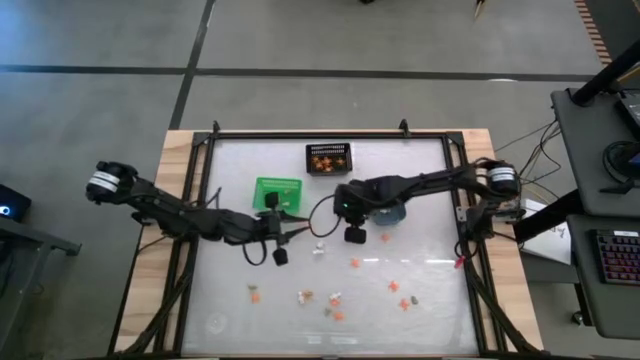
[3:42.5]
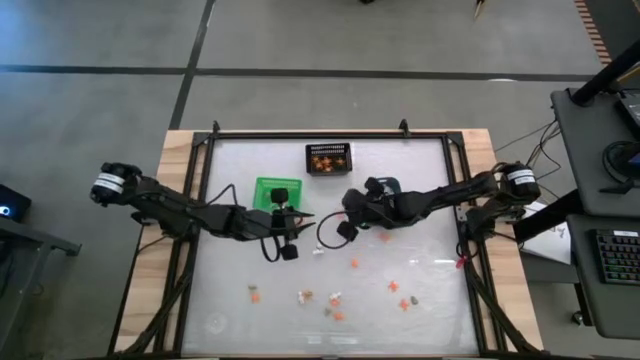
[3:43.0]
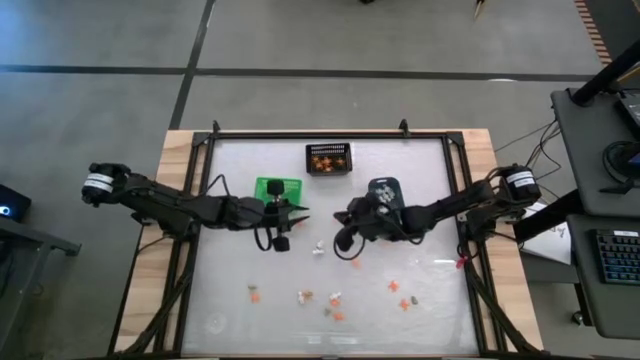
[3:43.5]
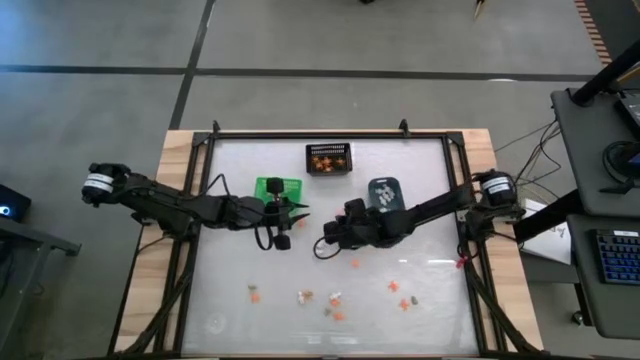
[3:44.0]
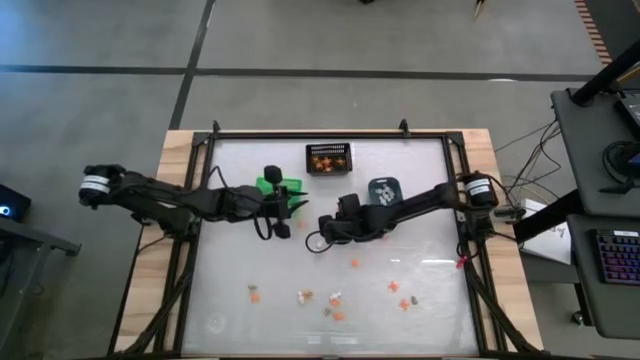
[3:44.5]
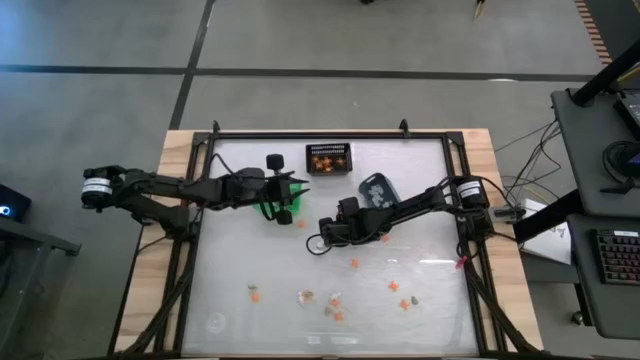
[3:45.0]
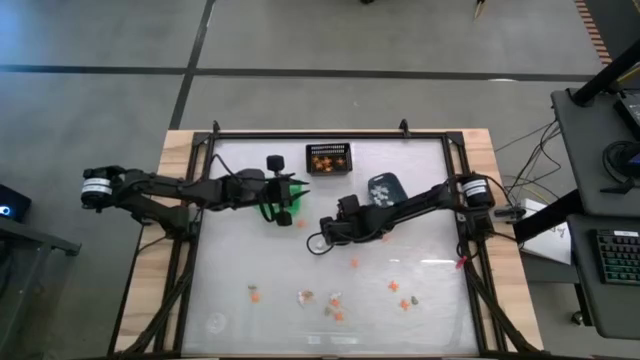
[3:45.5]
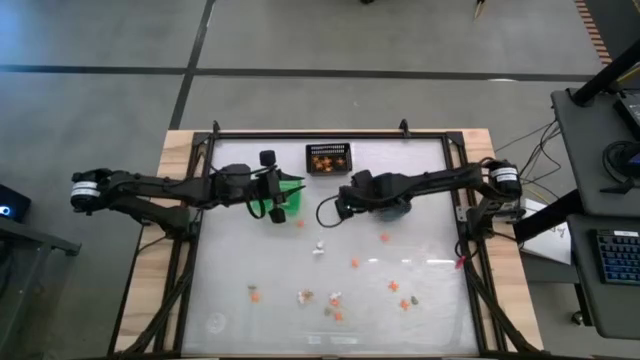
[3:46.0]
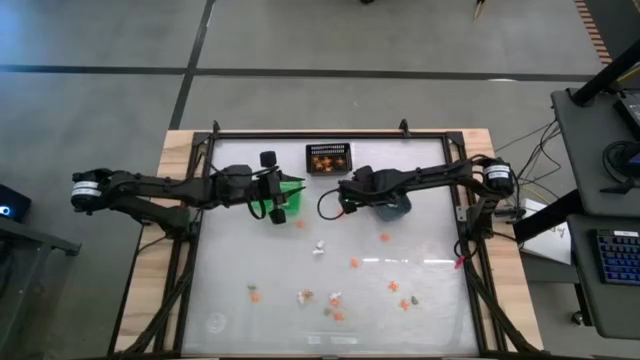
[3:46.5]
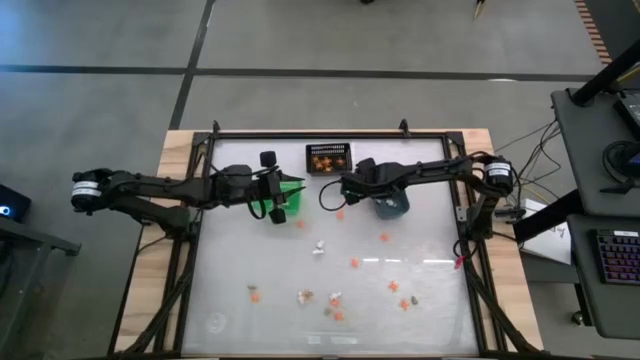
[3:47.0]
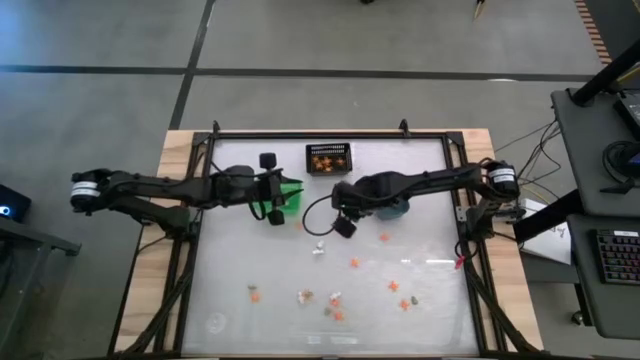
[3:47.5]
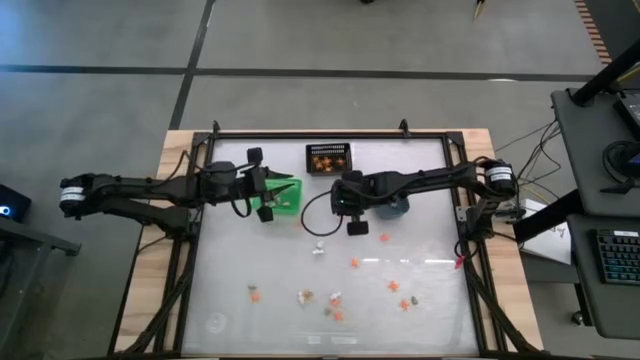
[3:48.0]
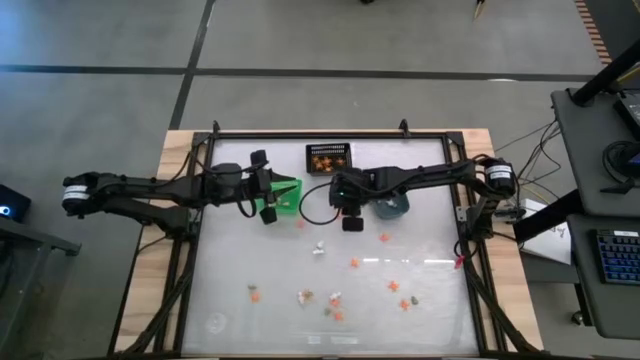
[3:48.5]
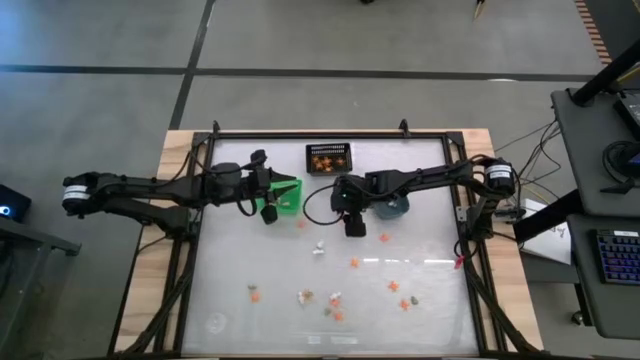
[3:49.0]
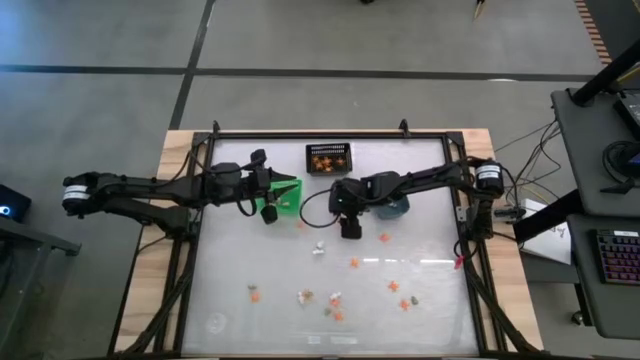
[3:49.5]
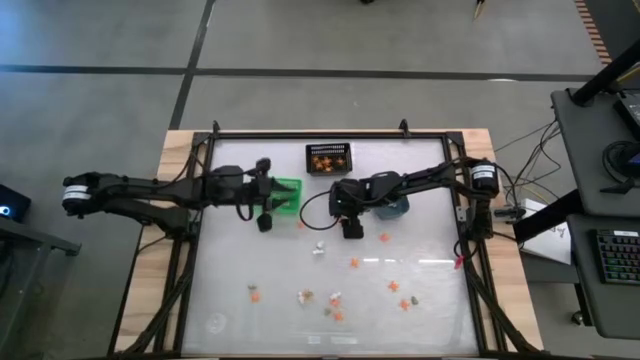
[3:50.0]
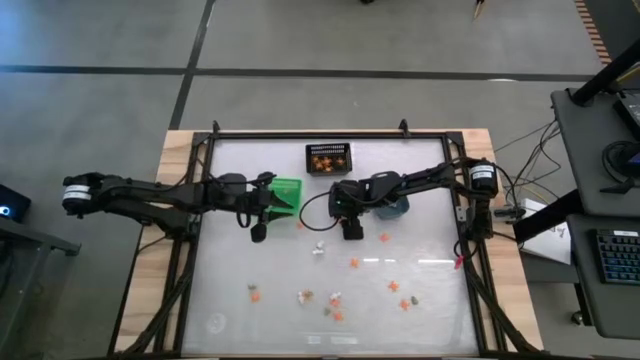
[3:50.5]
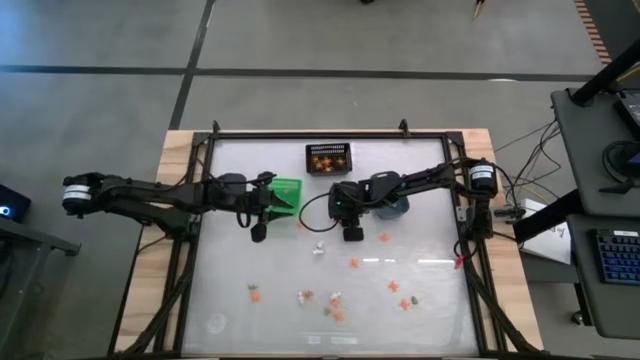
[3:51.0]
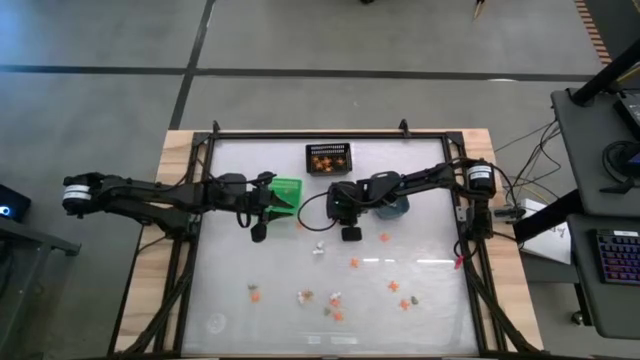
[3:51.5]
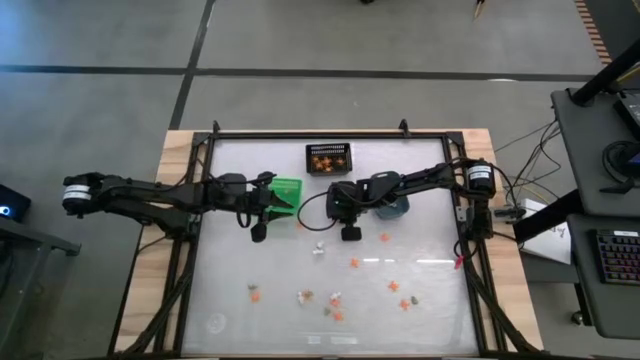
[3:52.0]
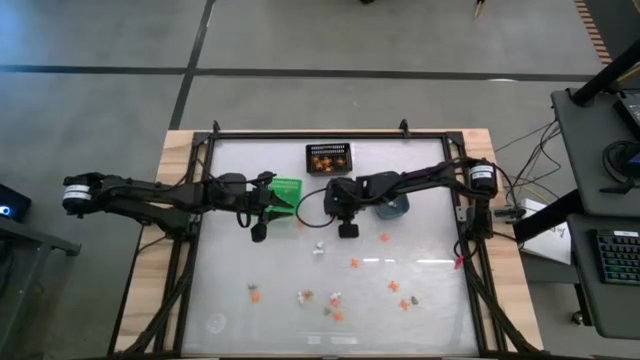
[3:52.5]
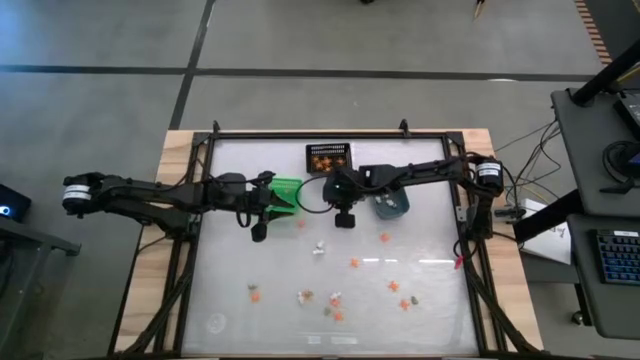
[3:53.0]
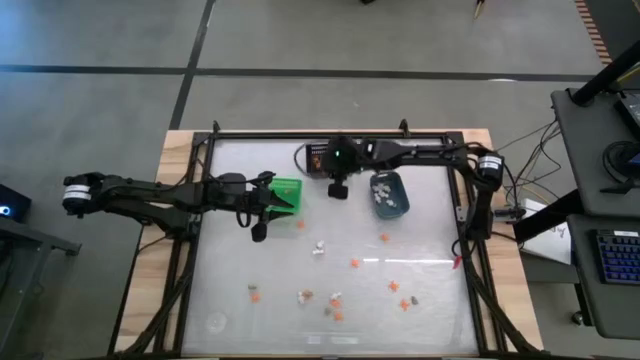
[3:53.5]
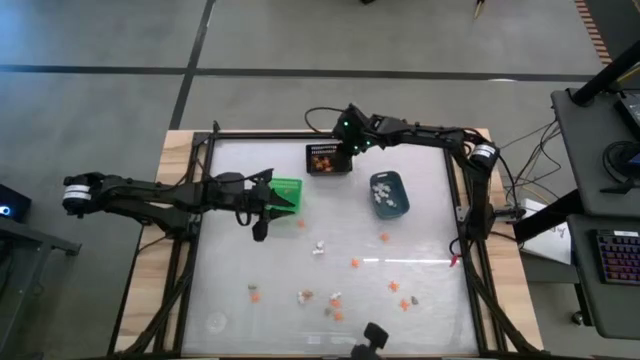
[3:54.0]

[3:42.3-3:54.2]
Task: Sort Halloween decoration
Put the orange spider toy into the black bin

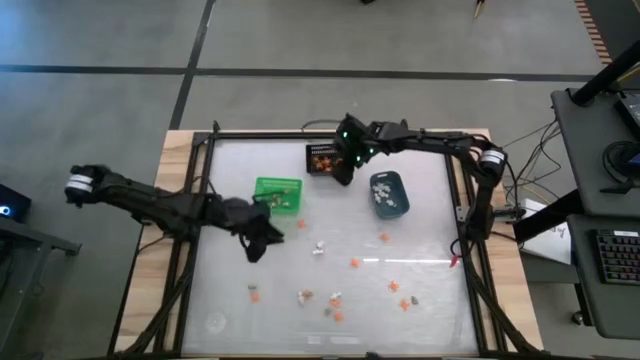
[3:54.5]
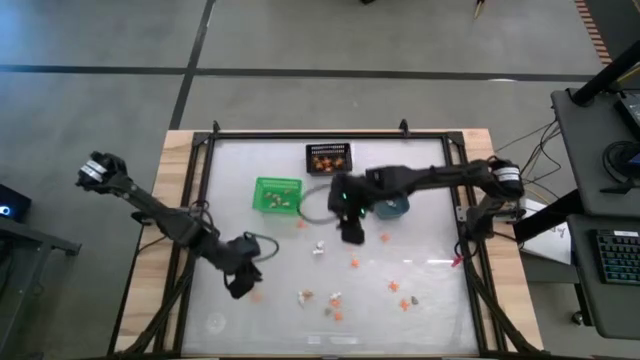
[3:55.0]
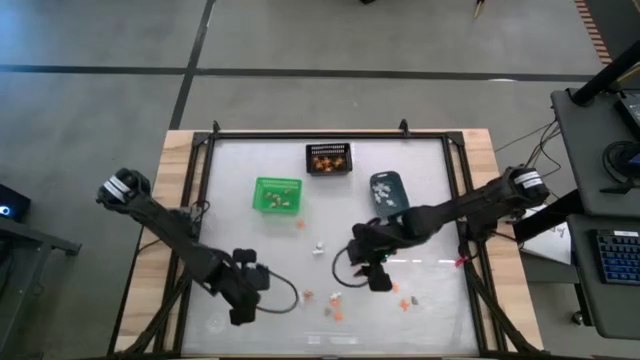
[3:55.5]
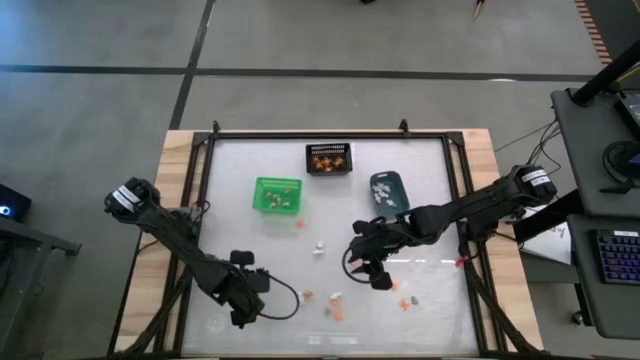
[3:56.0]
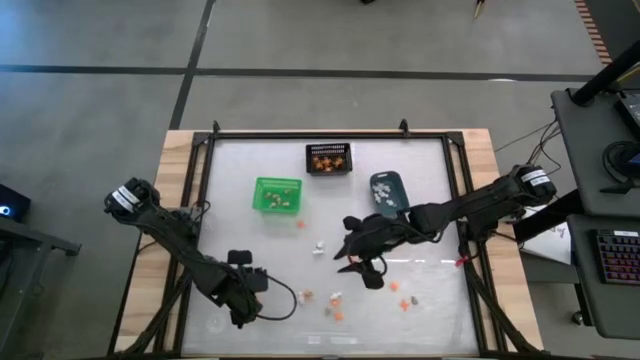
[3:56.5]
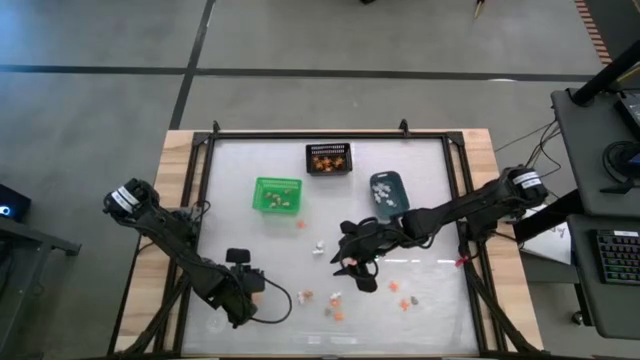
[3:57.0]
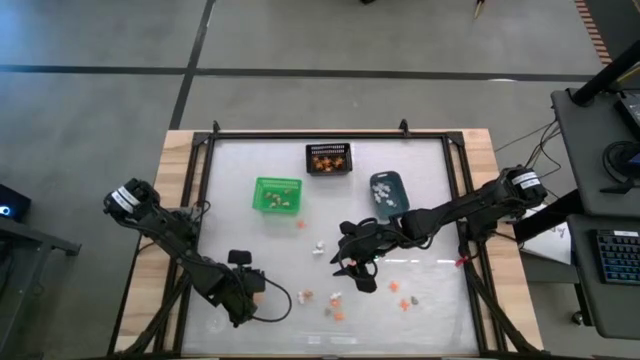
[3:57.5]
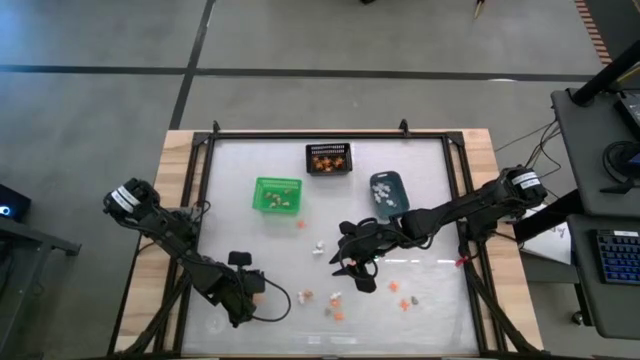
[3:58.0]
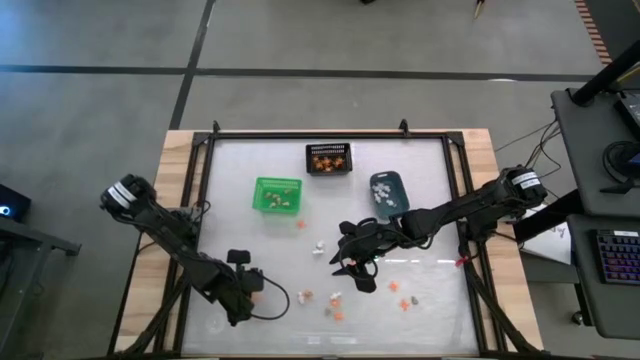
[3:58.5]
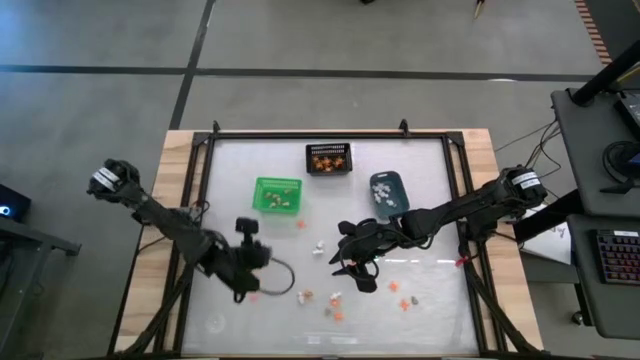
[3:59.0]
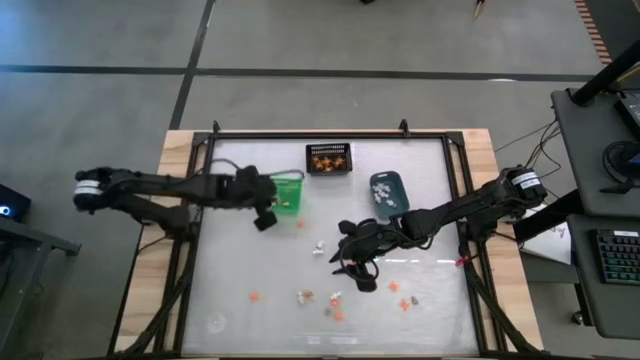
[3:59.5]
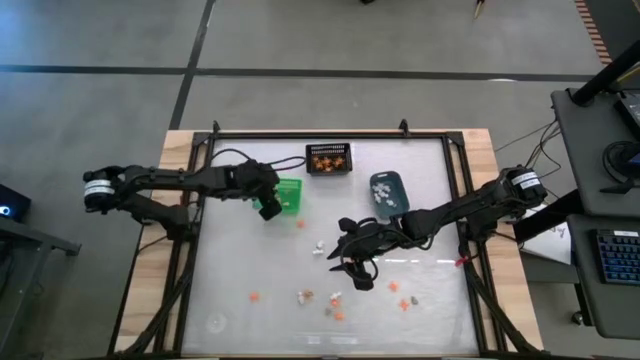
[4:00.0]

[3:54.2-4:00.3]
Put the gray skull toy into the green bin

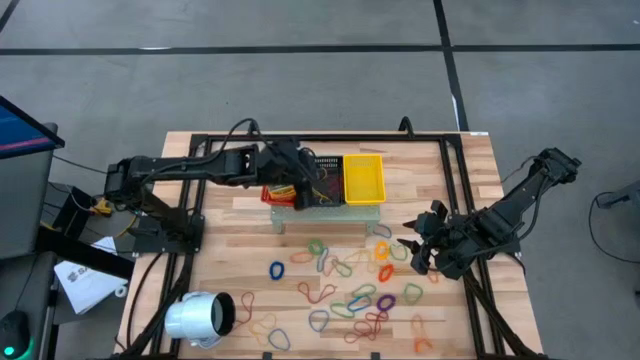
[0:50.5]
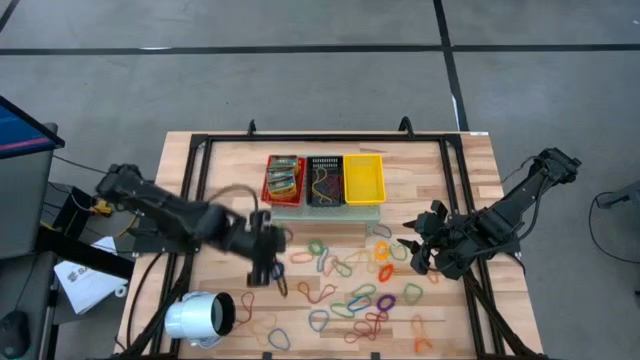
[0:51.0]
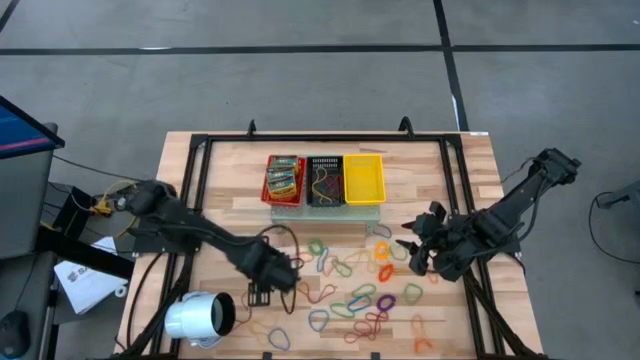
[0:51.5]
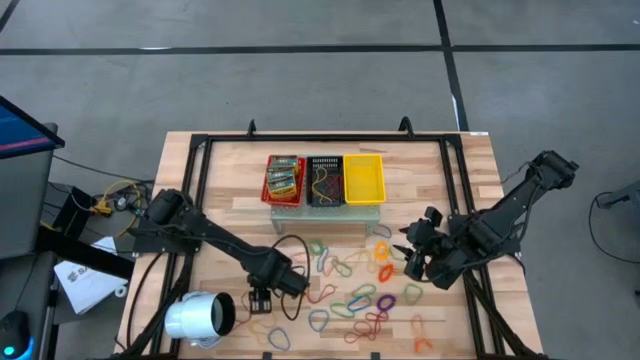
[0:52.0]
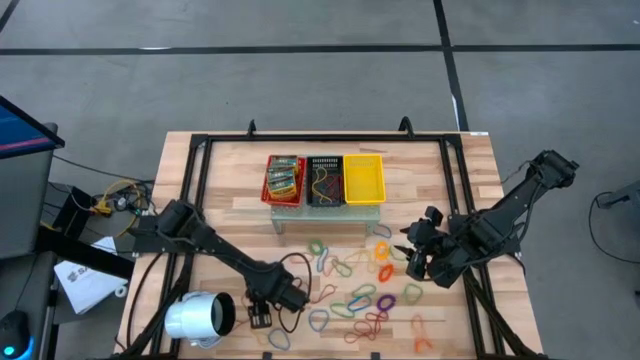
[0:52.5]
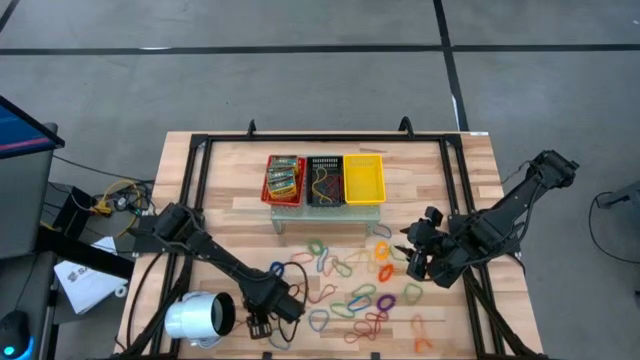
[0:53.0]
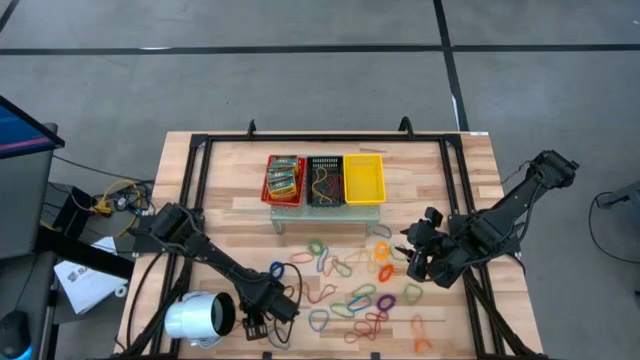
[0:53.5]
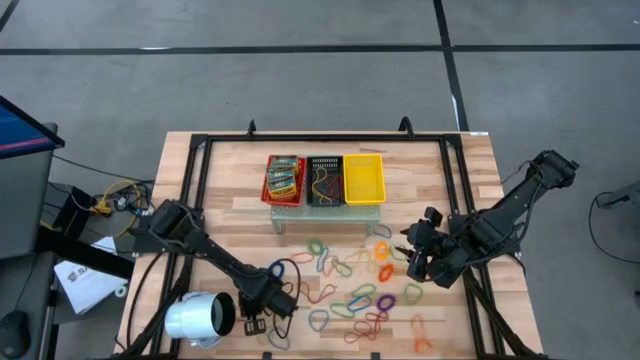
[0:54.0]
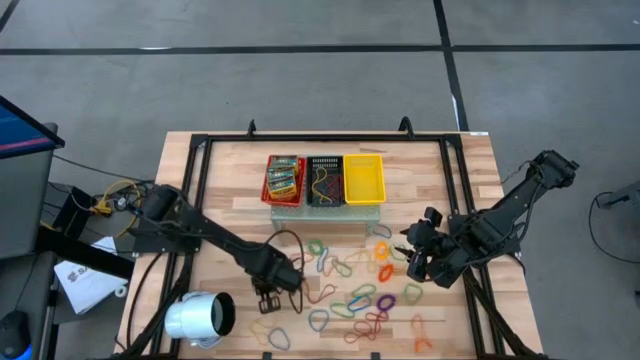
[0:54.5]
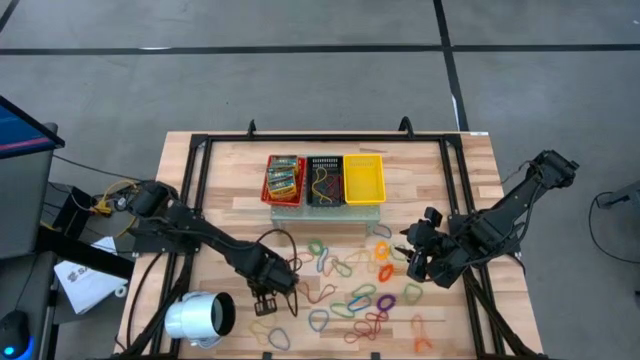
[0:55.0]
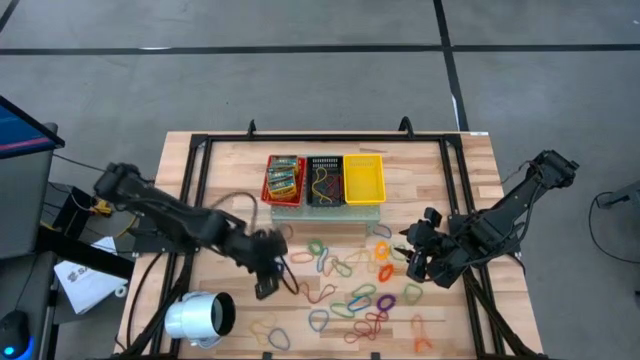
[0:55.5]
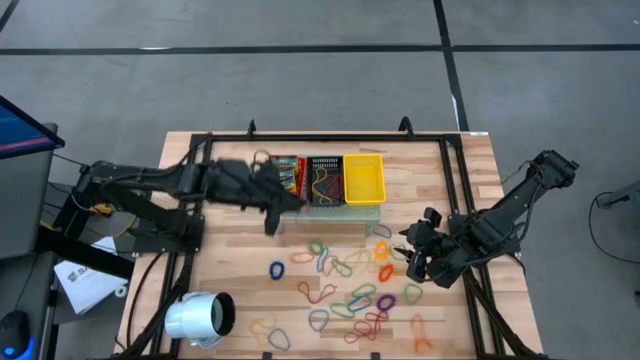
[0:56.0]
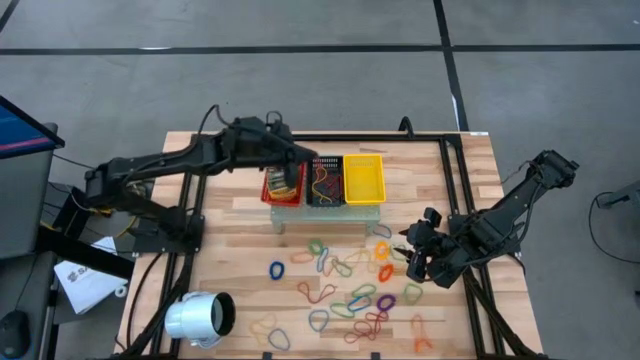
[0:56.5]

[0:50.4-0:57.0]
Task: Pick & Place Office Desk Supplies
Put the red rubber band into the black bin on the shelf
